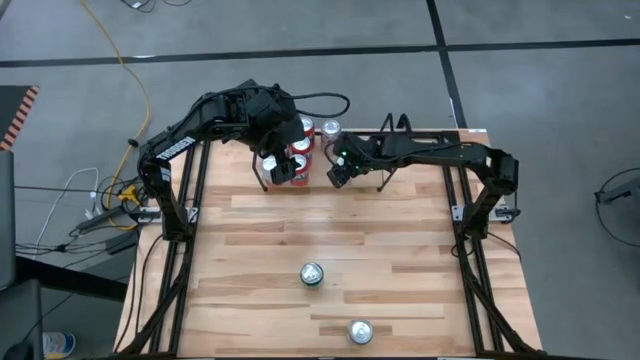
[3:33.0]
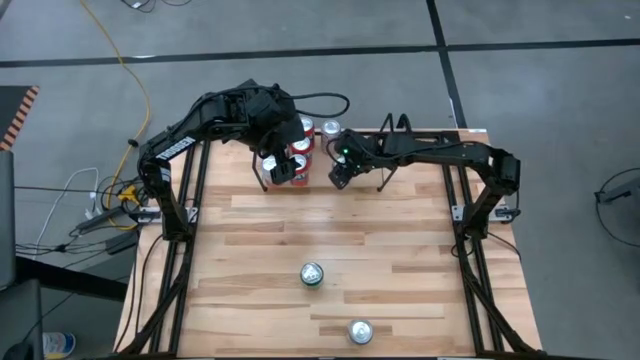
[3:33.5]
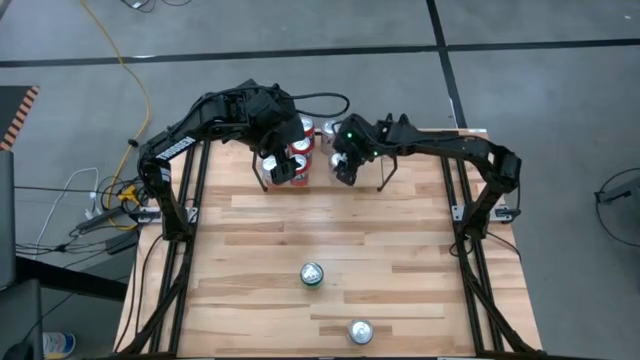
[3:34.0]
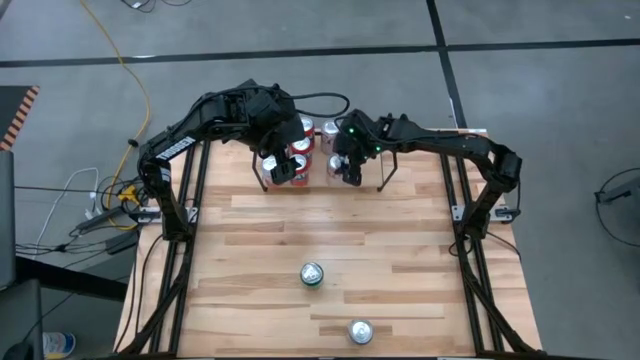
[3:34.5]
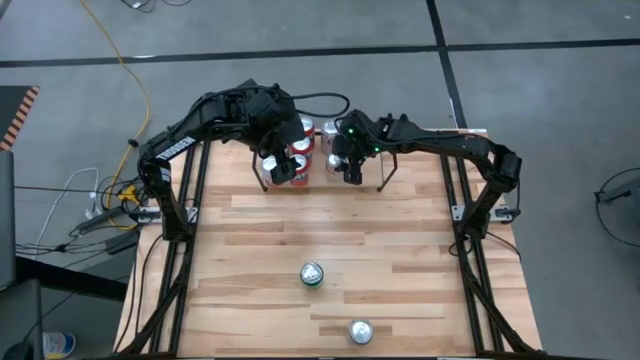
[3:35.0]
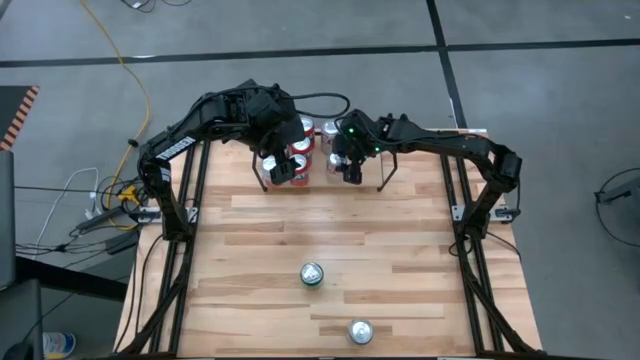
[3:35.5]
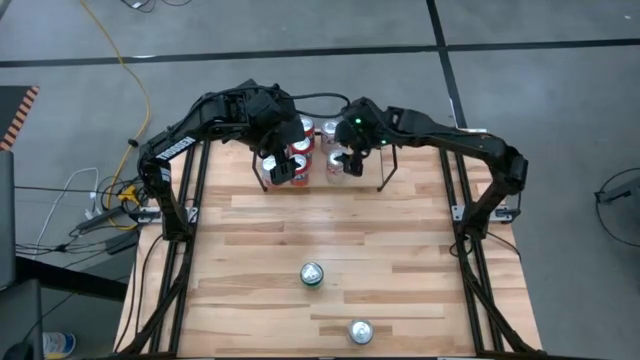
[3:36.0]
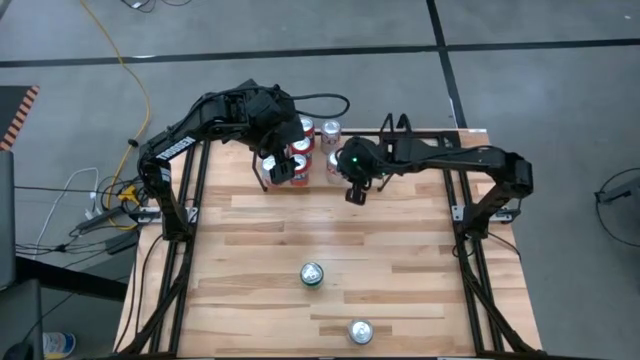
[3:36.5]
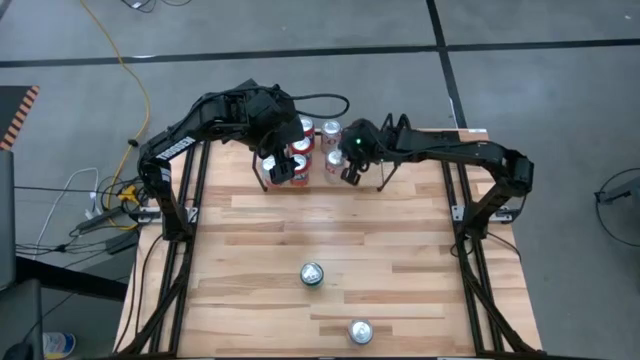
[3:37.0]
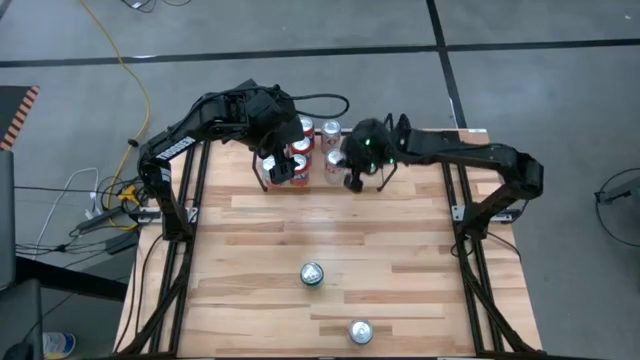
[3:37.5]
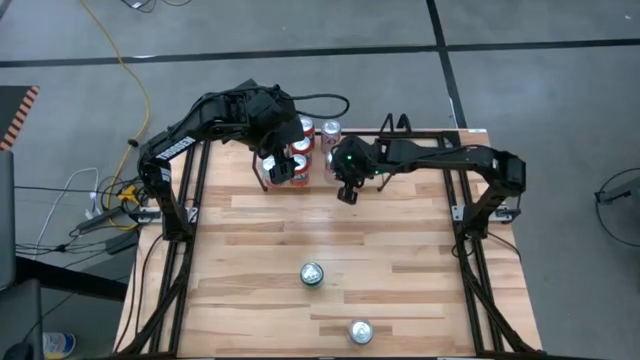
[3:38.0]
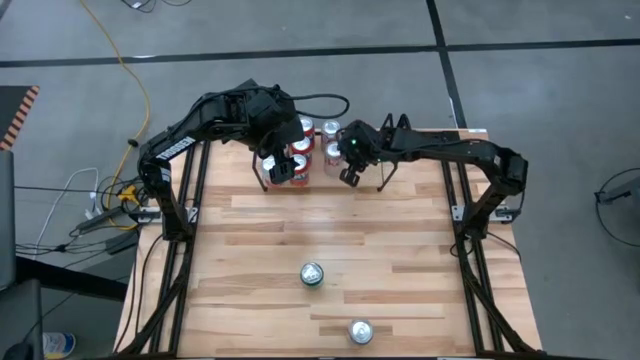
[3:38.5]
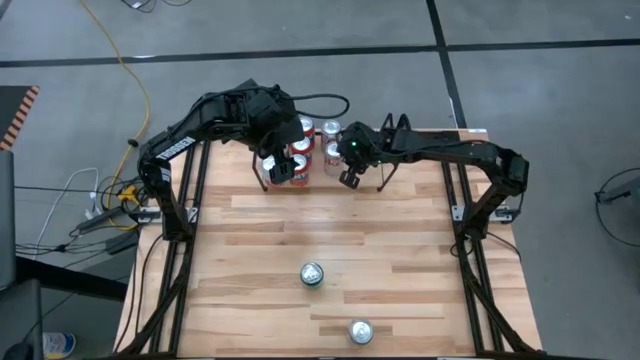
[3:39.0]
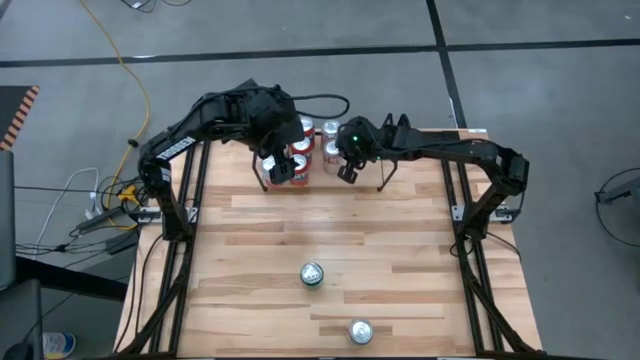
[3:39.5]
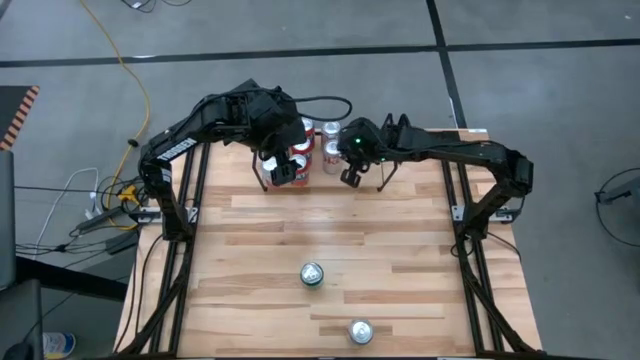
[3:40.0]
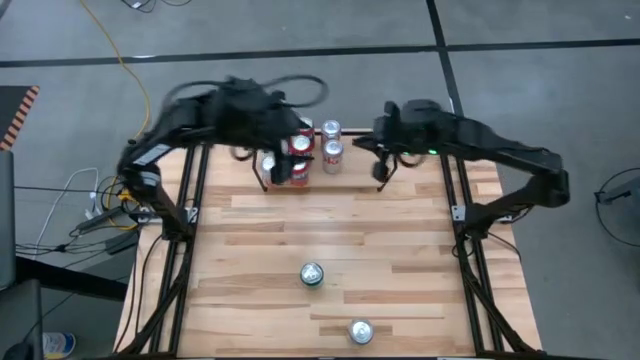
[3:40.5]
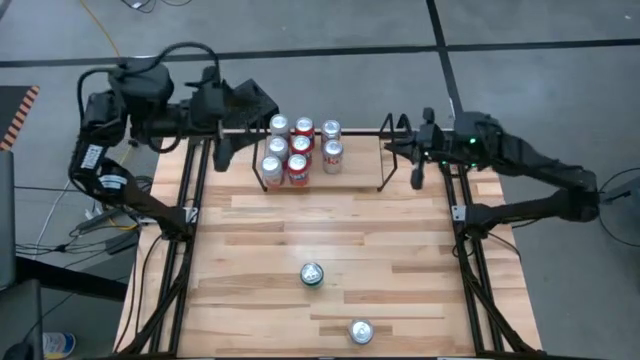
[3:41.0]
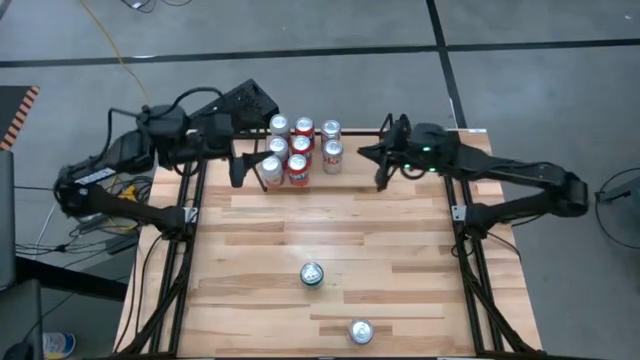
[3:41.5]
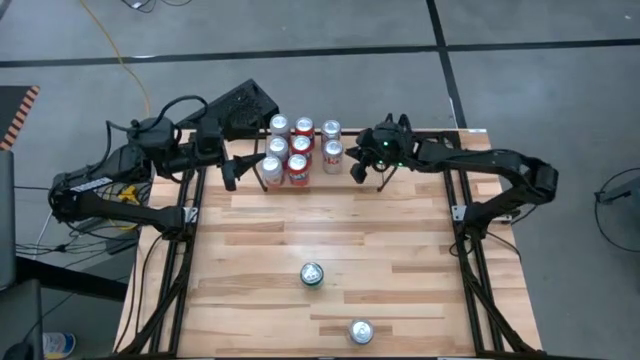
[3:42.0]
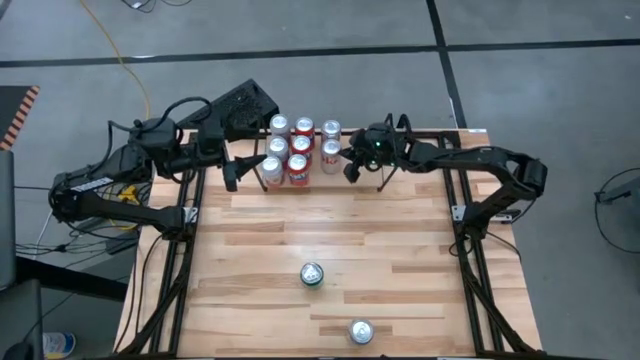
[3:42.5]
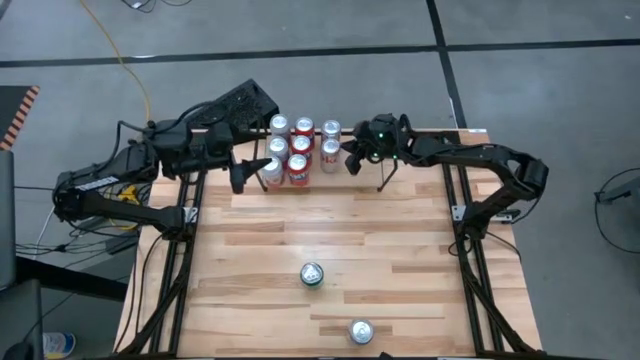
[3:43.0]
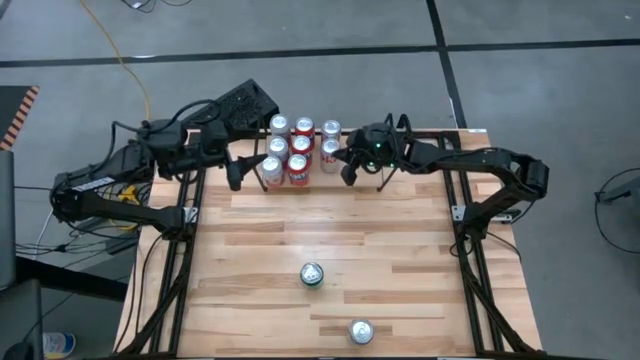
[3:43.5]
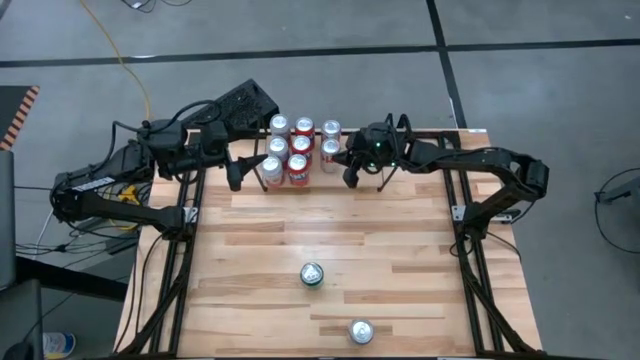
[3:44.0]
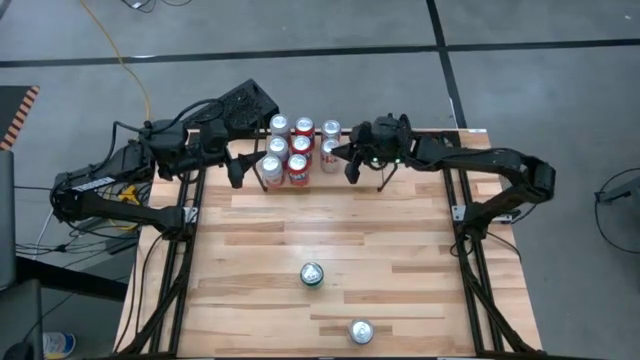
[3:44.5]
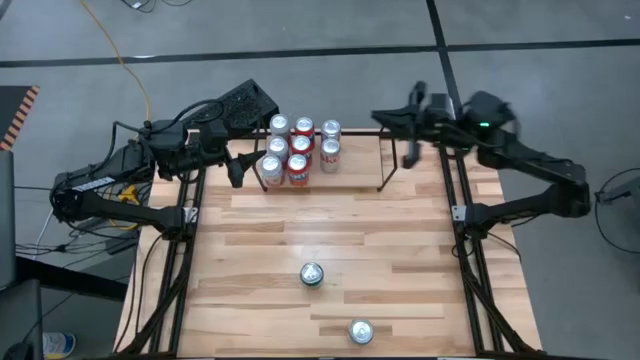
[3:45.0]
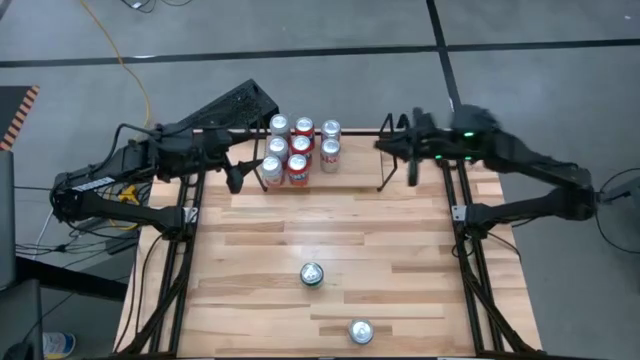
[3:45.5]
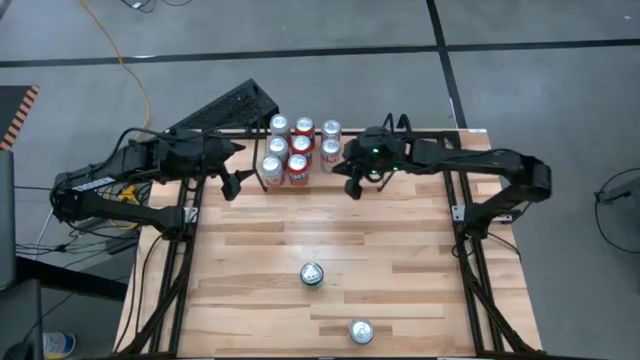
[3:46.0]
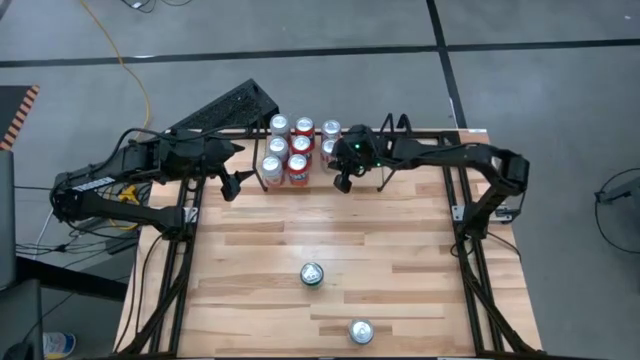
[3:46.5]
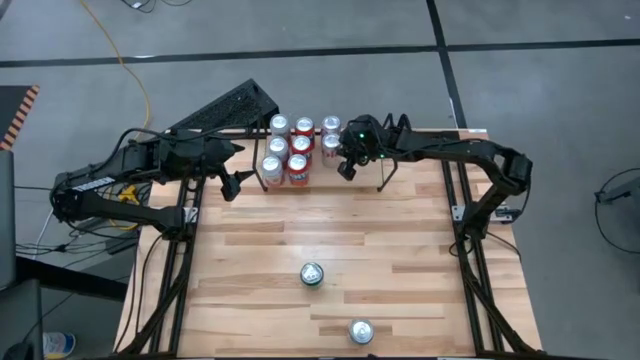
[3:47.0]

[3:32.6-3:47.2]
Task: Place canned beverage on shelf
Put the left silver soda can on the shelf aligned with the other silver soda can
